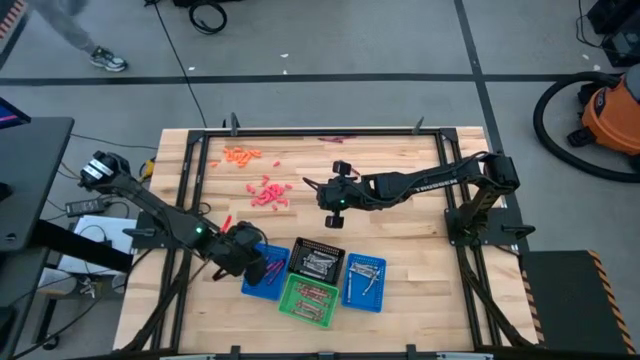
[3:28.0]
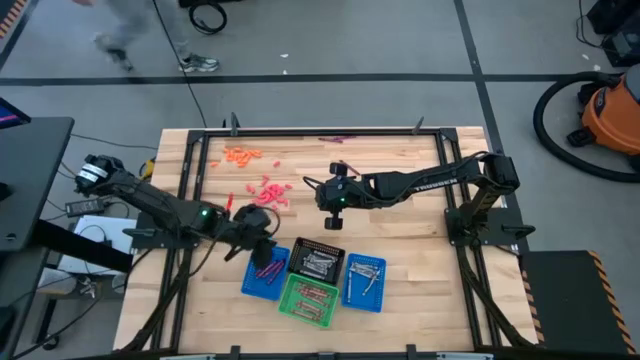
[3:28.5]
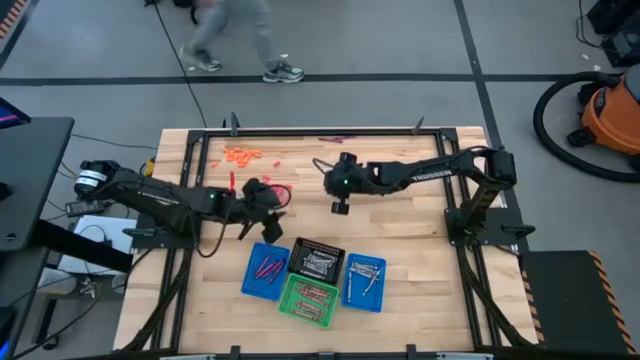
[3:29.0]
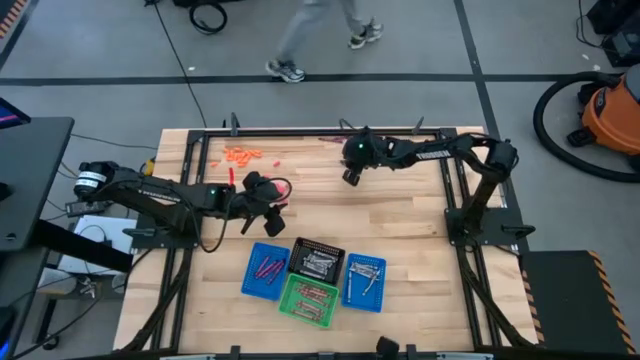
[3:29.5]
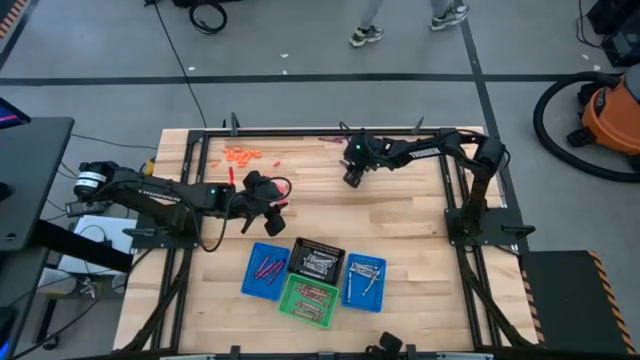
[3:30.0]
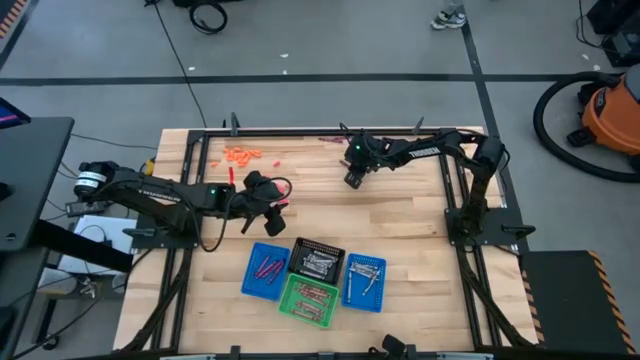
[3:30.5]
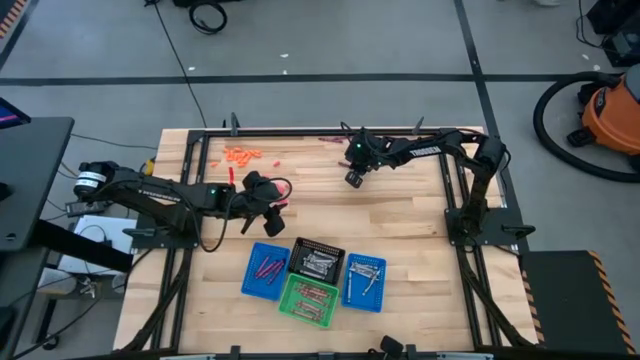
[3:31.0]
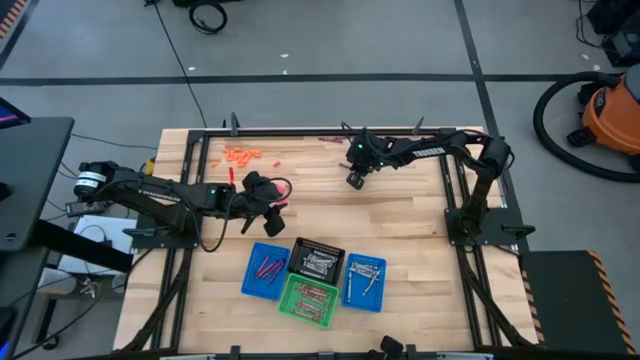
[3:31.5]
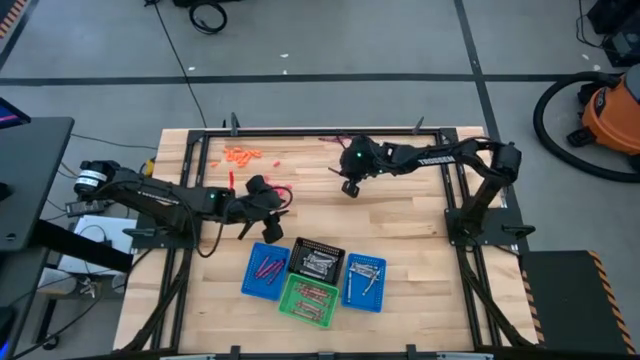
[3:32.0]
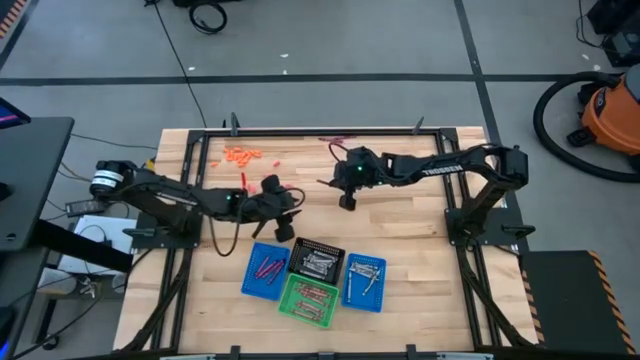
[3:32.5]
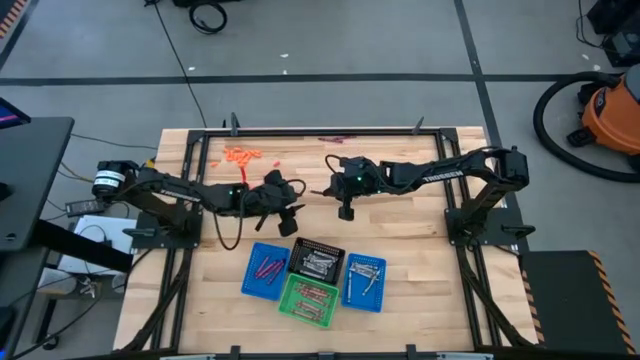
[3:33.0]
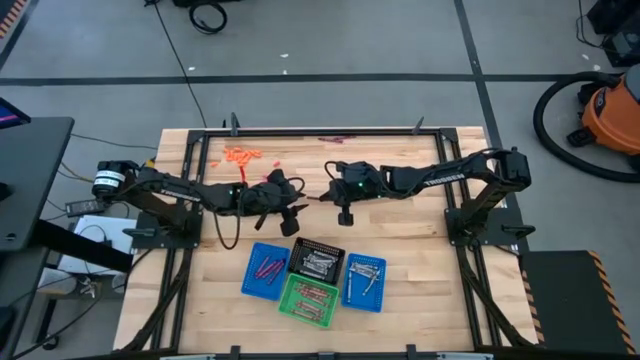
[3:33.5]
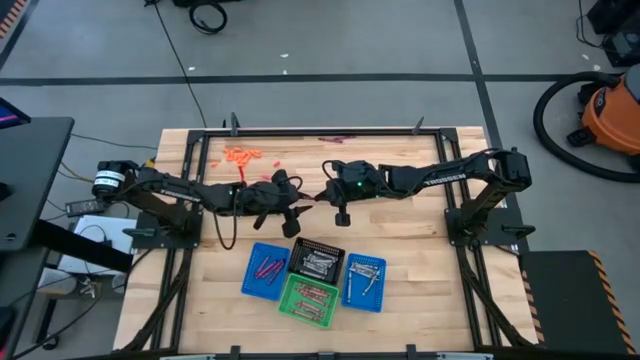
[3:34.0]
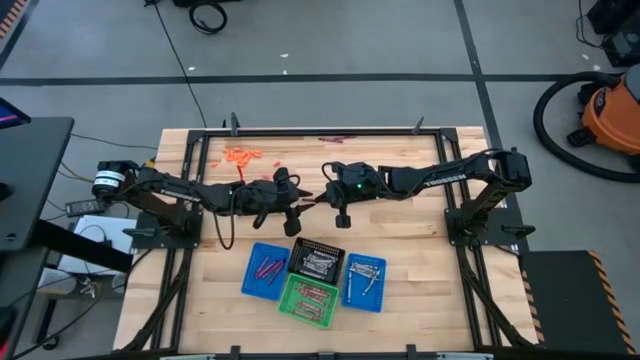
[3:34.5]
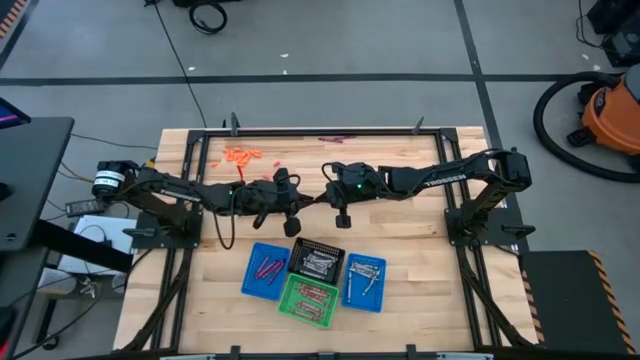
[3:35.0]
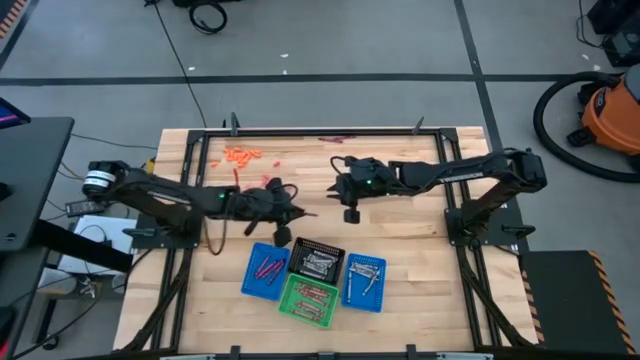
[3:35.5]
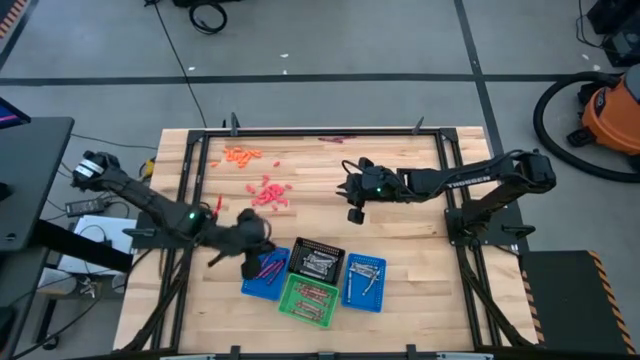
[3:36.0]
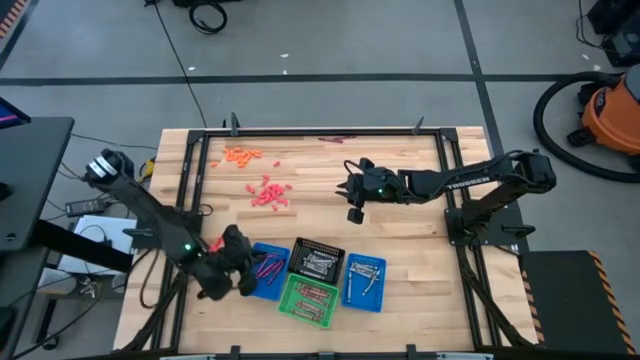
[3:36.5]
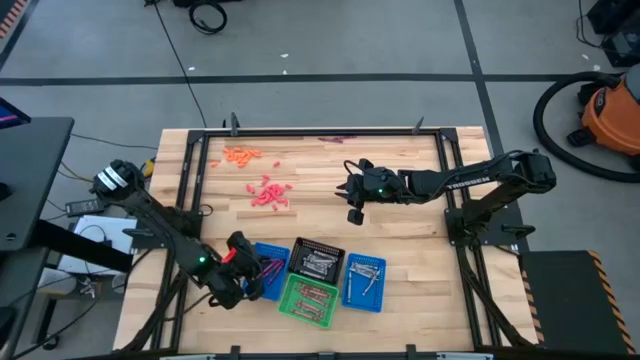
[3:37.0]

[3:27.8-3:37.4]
Task: Sort crayons
Put the dark red crayon into the left blue bin

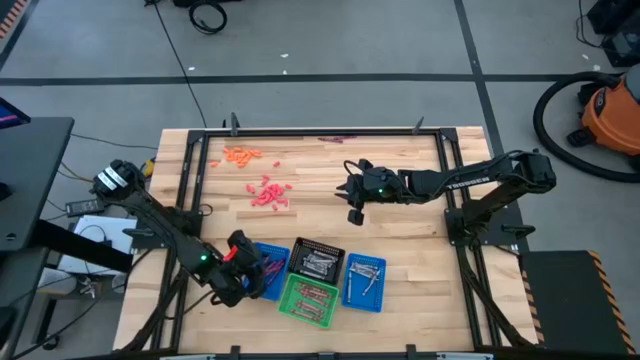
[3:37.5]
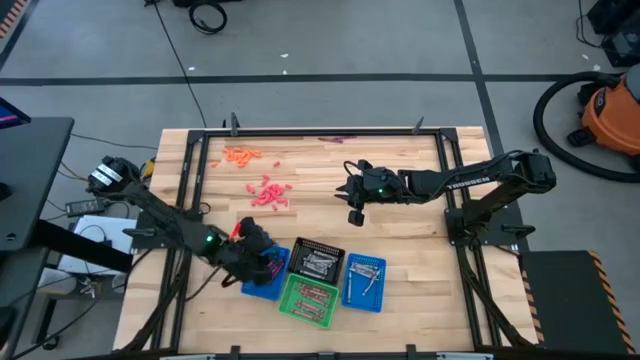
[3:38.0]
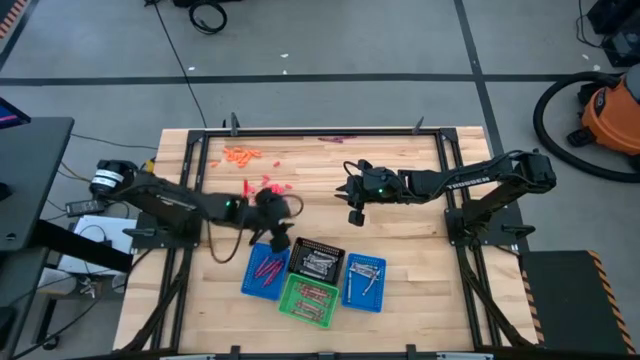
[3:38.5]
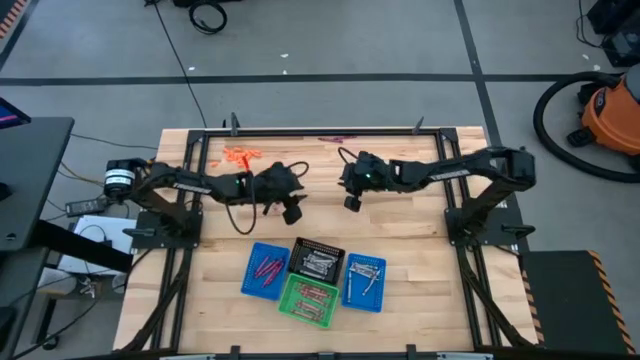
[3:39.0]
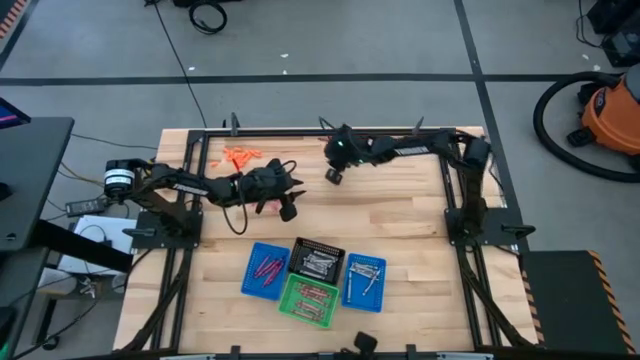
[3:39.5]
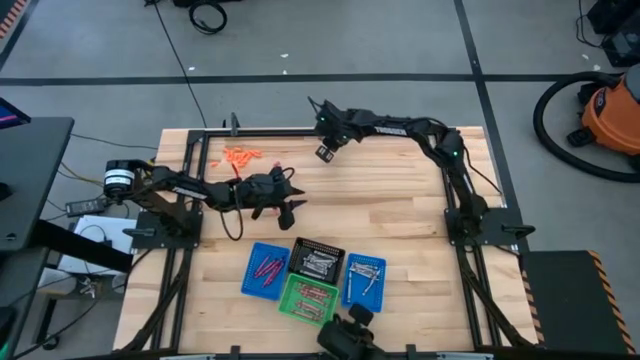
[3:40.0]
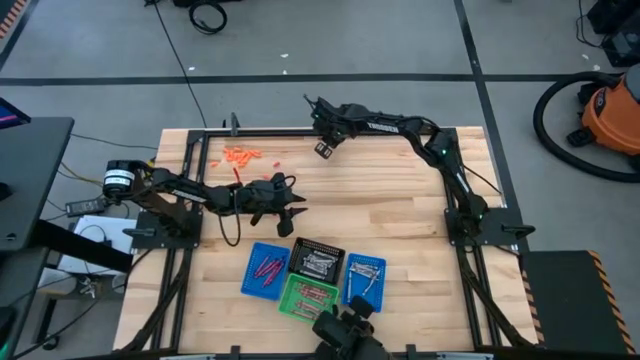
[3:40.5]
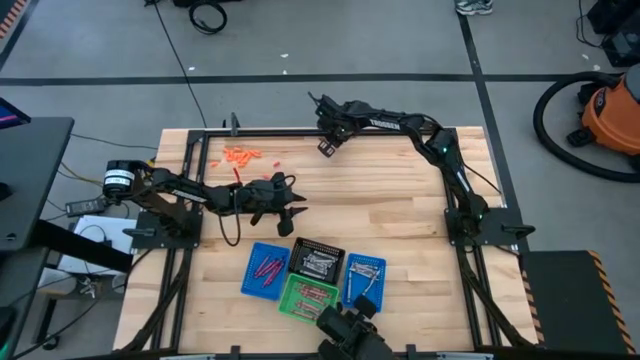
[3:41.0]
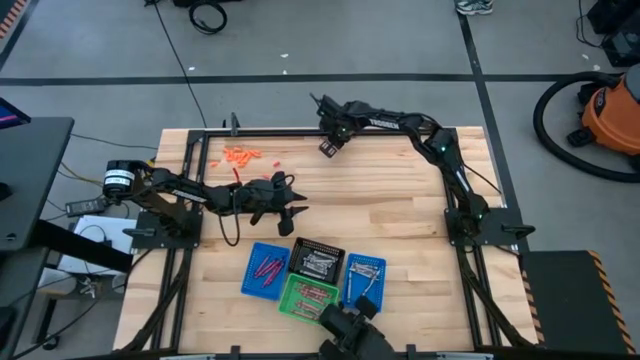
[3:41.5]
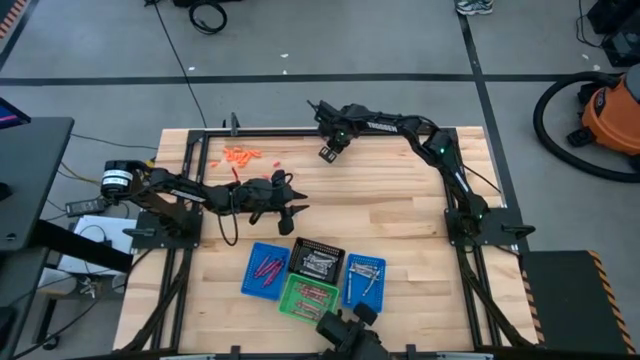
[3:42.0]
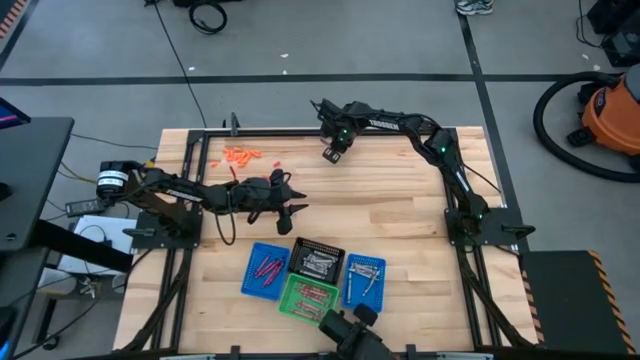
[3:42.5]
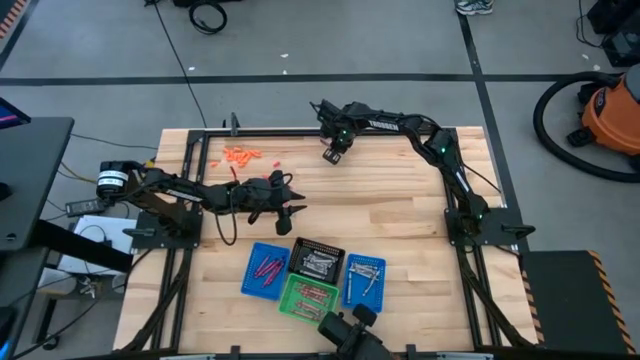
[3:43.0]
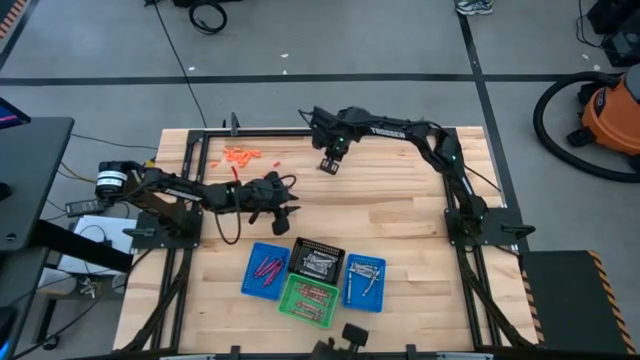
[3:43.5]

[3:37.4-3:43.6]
Put the dark red crayon into the left blue bin

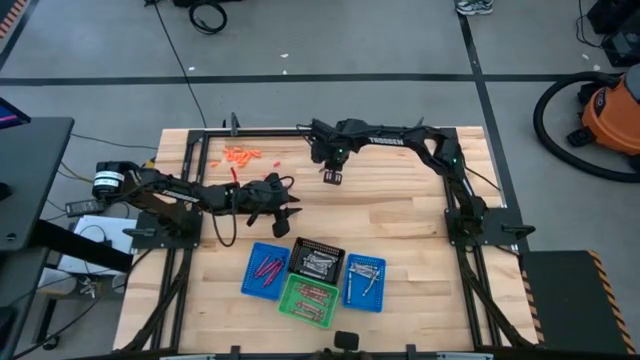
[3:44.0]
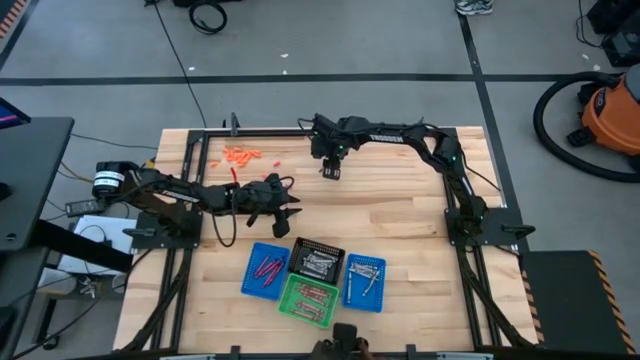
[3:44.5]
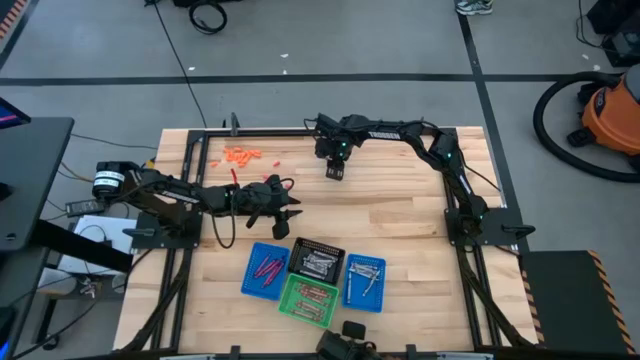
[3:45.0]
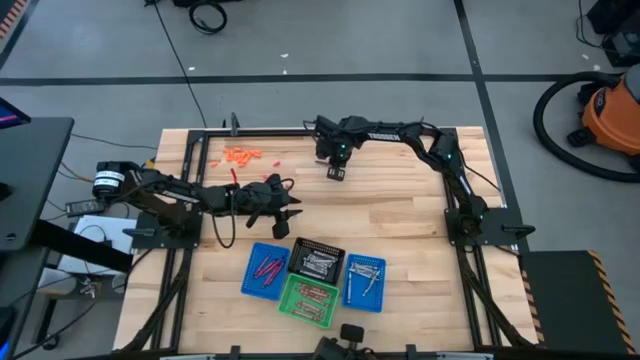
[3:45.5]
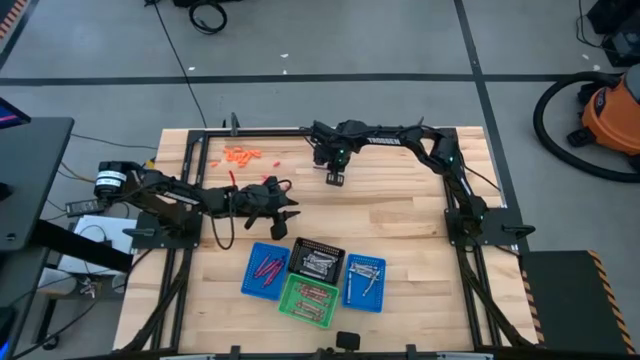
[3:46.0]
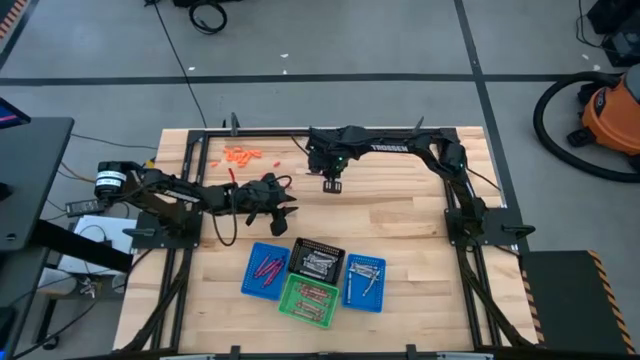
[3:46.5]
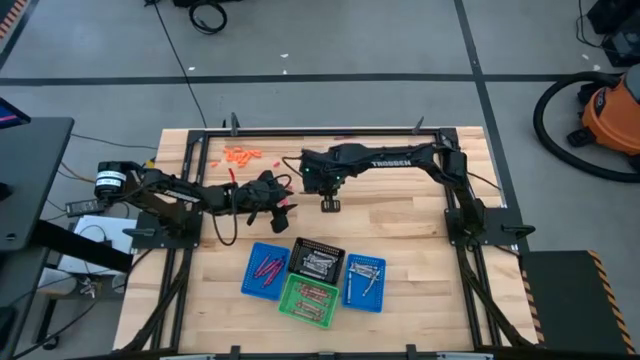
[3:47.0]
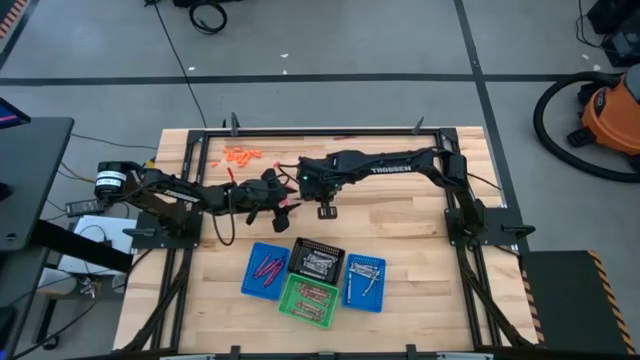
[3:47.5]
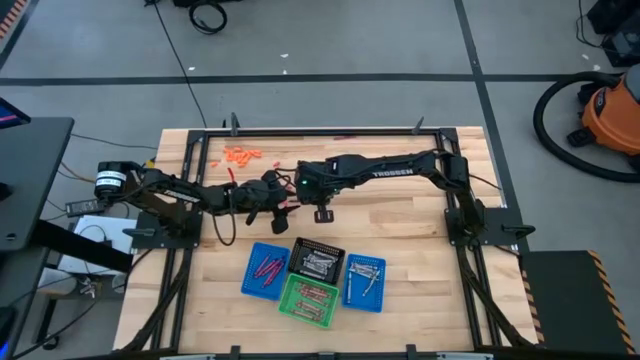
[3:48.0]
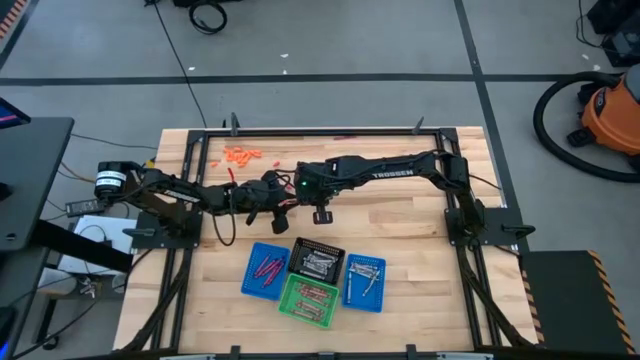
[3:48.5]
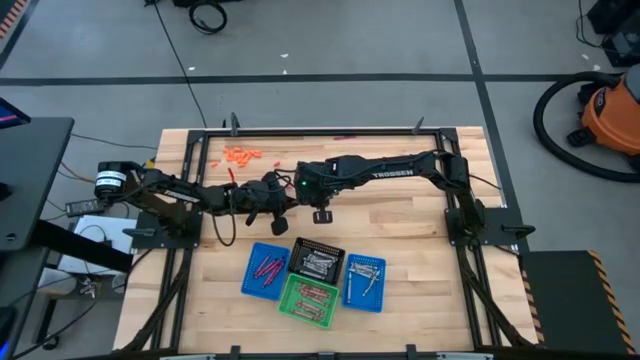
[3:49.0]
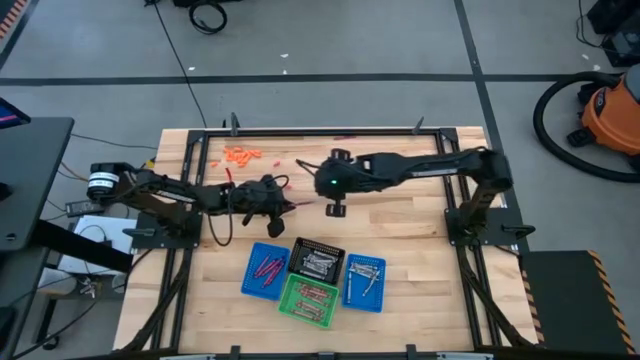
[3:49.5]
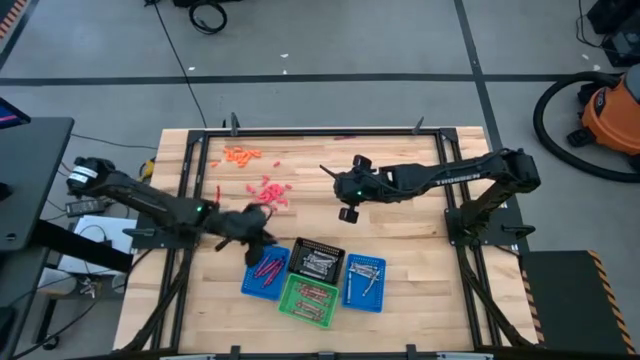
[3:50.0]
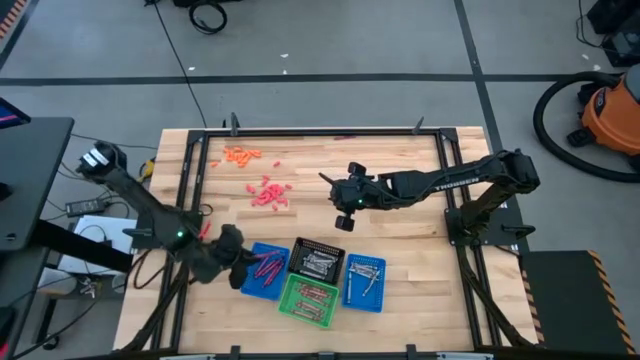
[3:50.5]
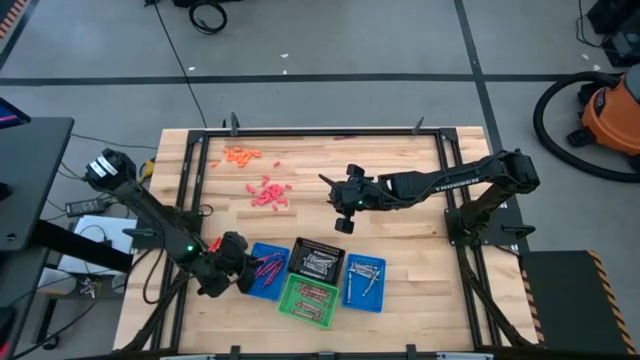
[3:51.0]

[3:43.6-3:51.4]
Put the dark red crayon into the left blue bin
